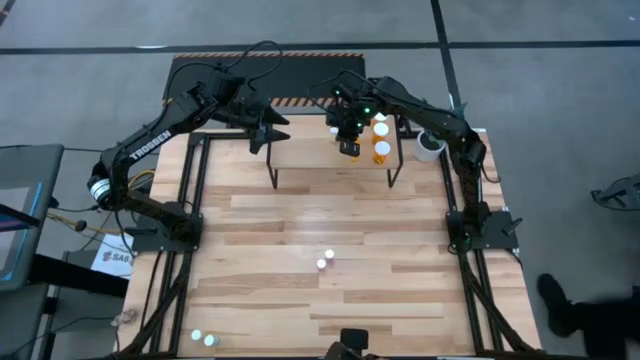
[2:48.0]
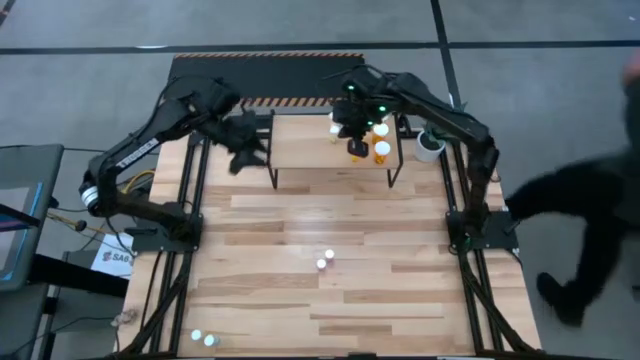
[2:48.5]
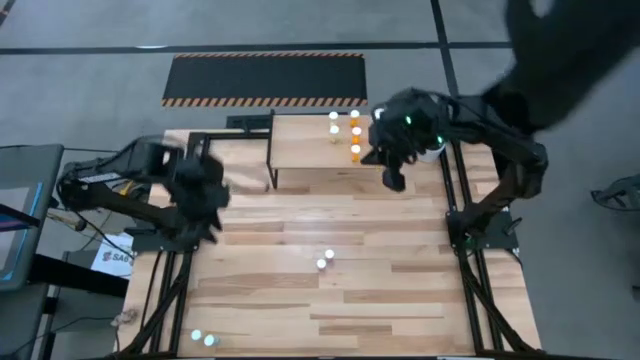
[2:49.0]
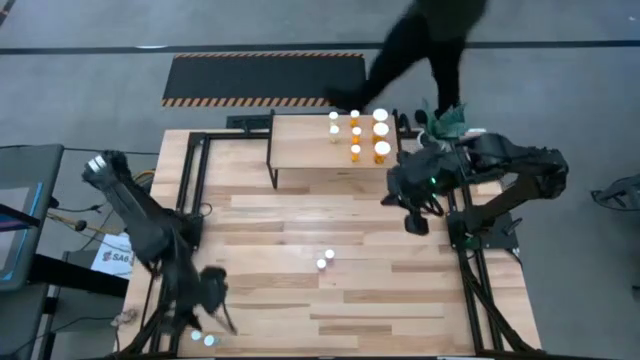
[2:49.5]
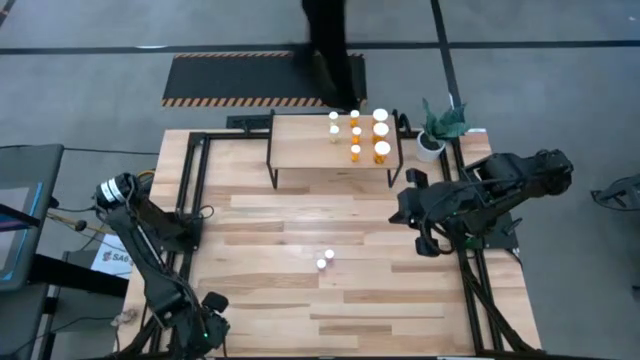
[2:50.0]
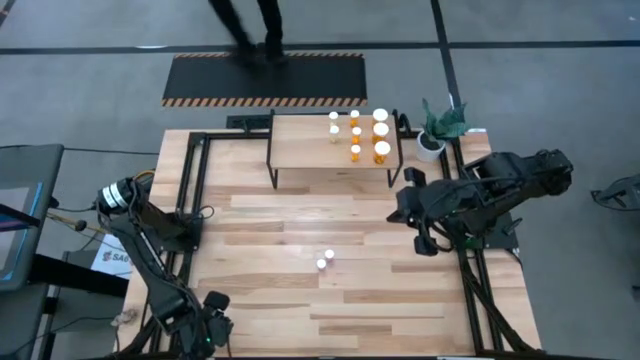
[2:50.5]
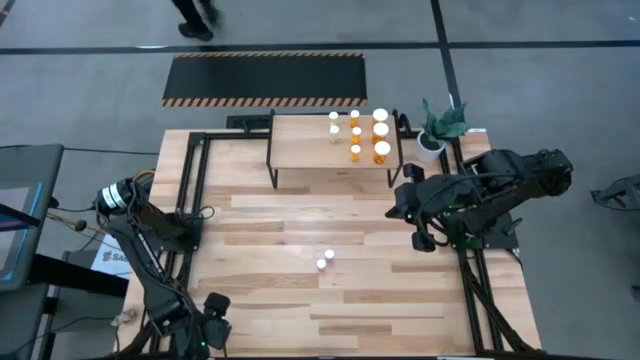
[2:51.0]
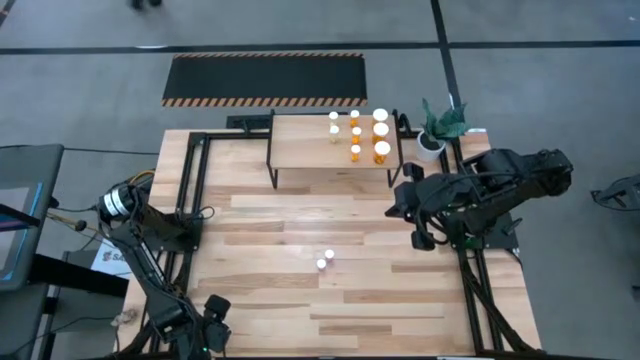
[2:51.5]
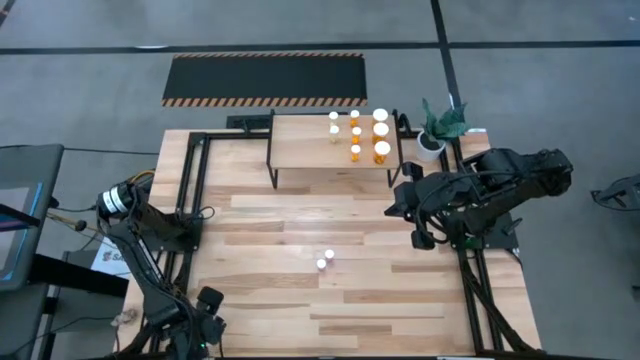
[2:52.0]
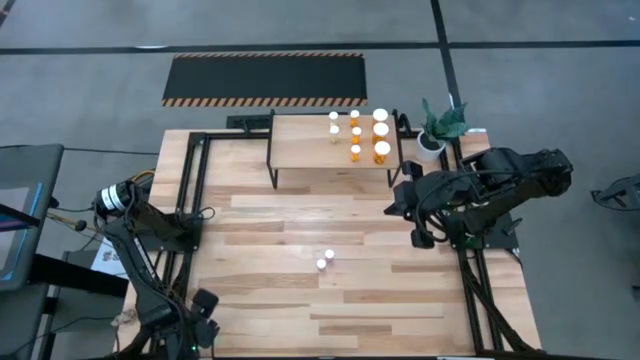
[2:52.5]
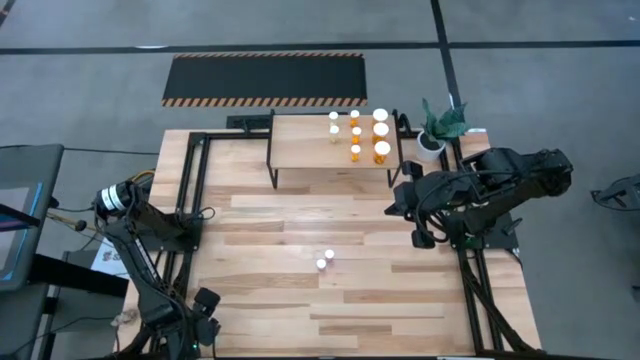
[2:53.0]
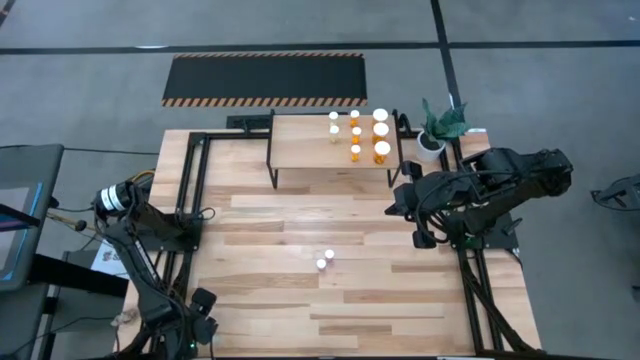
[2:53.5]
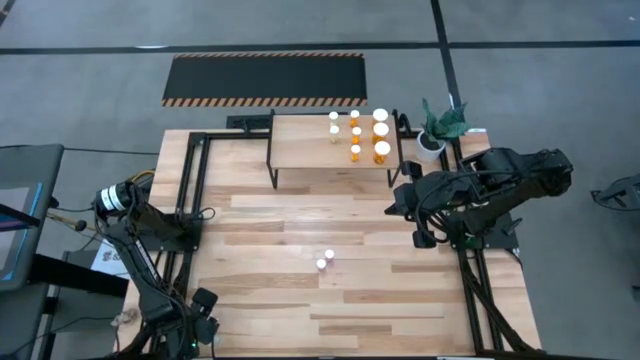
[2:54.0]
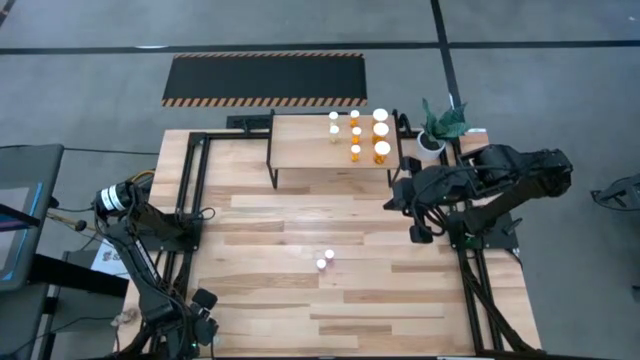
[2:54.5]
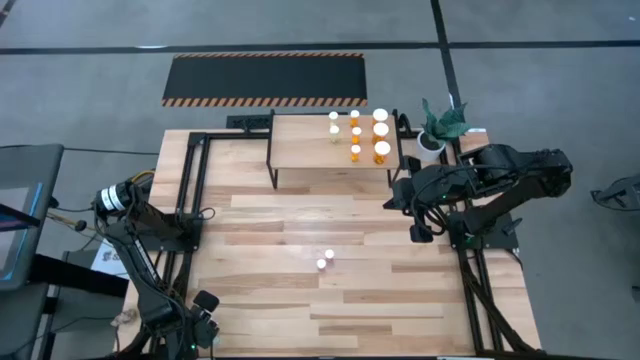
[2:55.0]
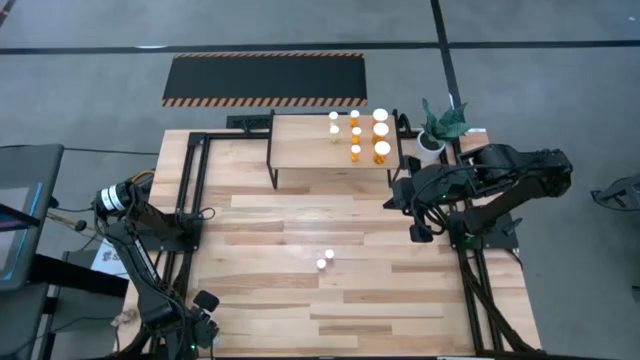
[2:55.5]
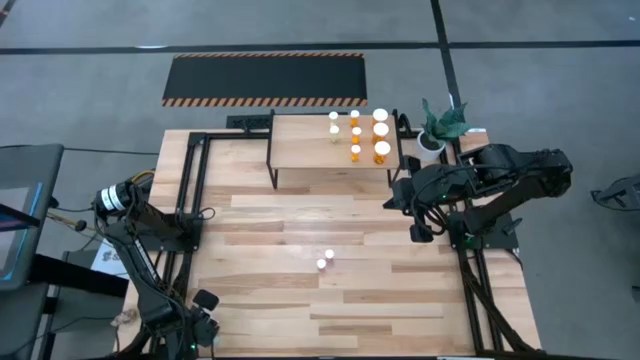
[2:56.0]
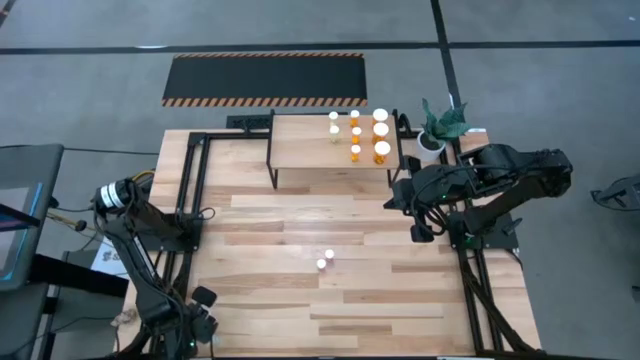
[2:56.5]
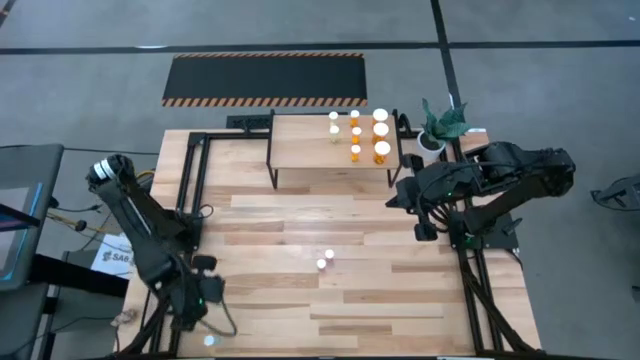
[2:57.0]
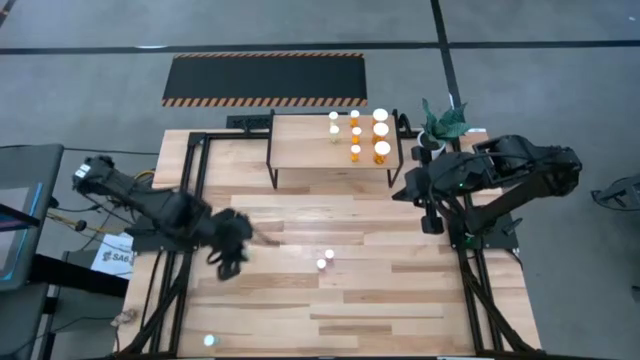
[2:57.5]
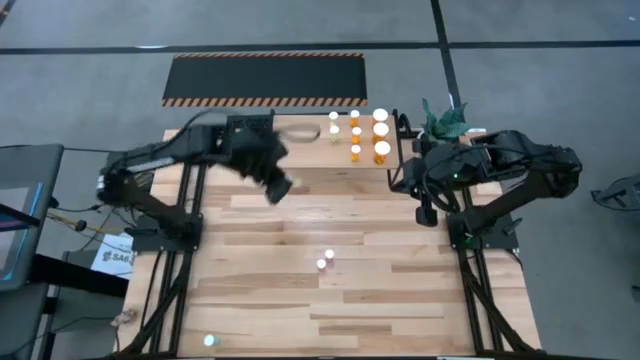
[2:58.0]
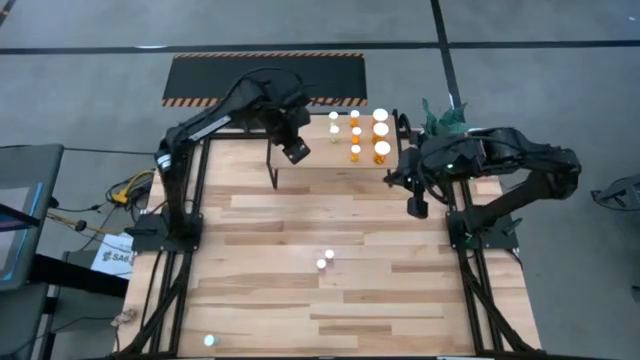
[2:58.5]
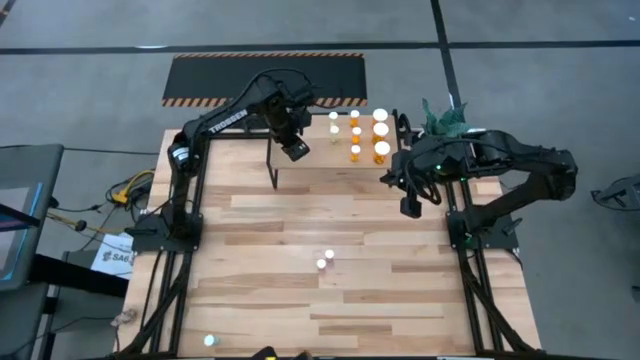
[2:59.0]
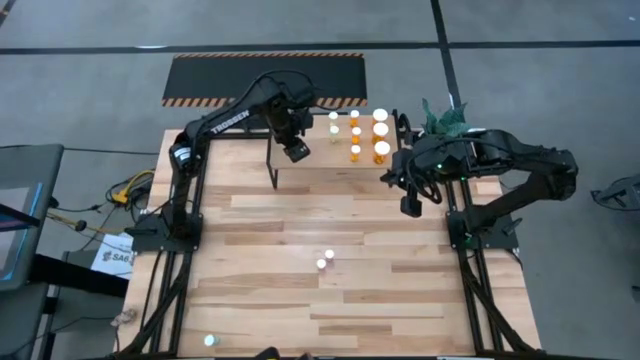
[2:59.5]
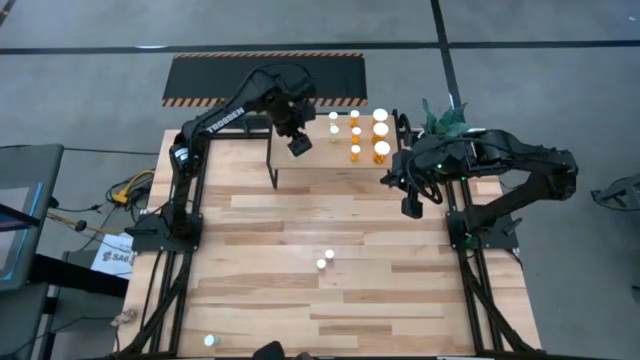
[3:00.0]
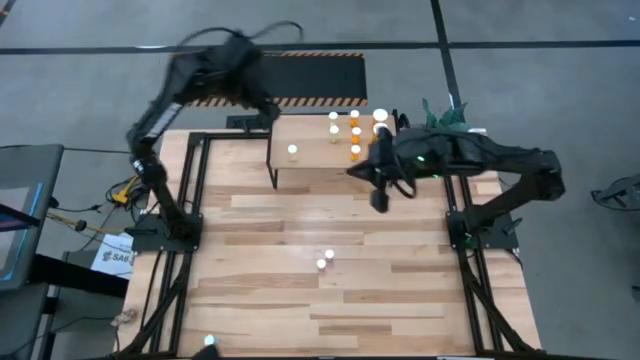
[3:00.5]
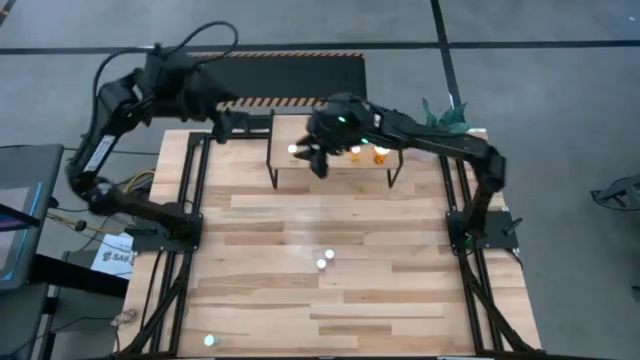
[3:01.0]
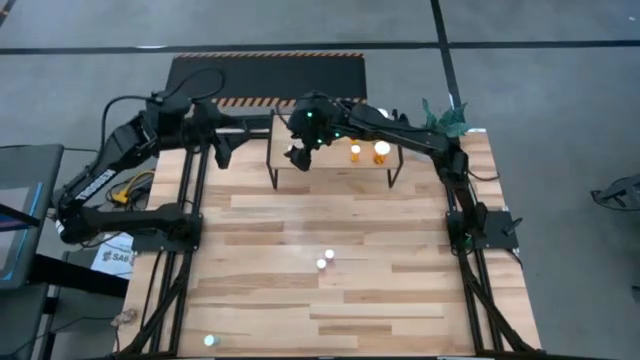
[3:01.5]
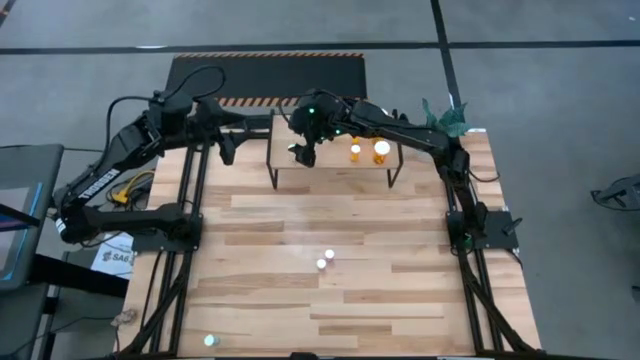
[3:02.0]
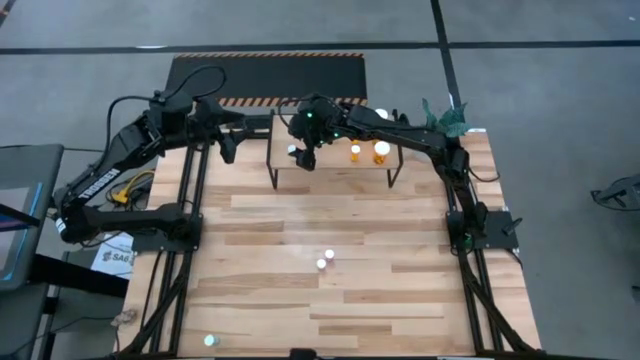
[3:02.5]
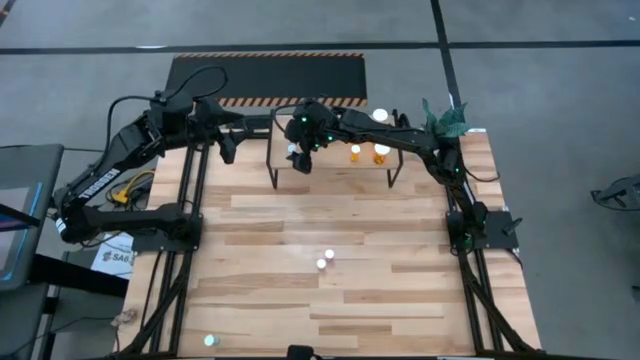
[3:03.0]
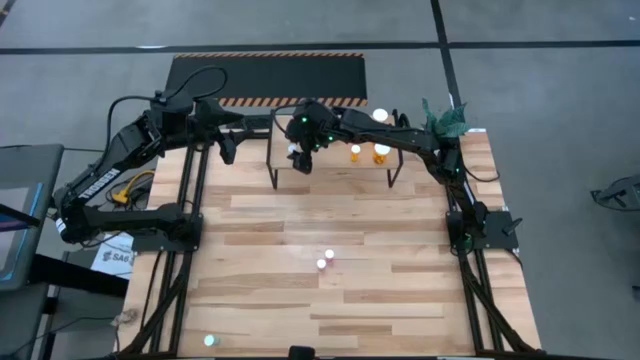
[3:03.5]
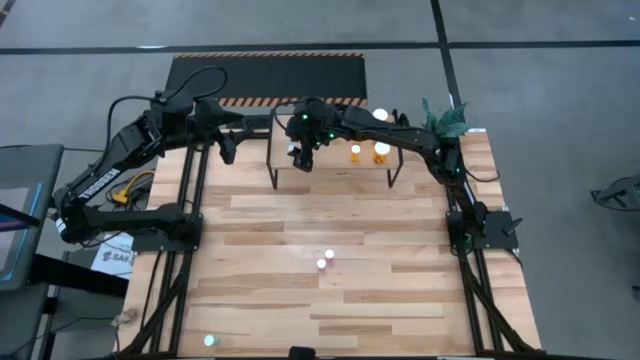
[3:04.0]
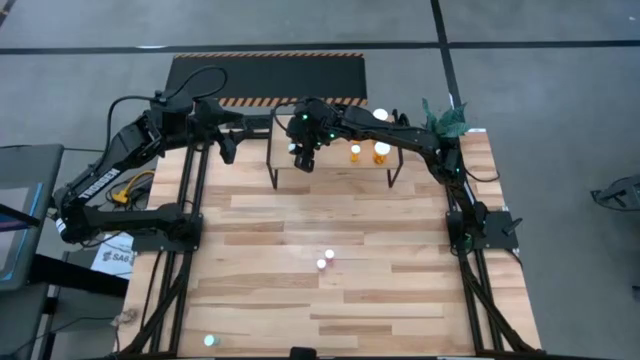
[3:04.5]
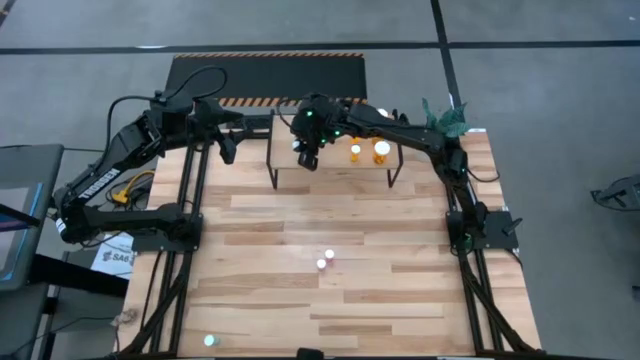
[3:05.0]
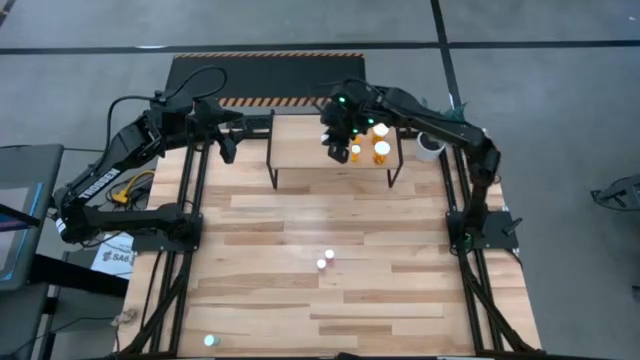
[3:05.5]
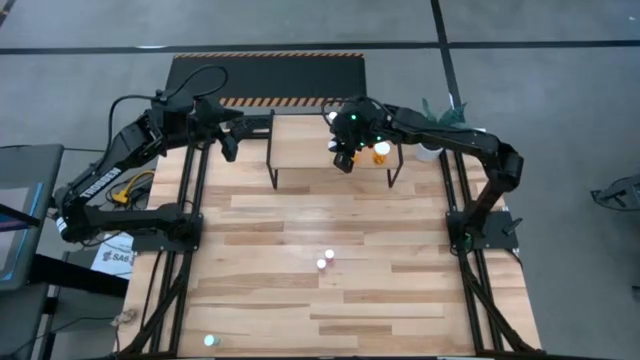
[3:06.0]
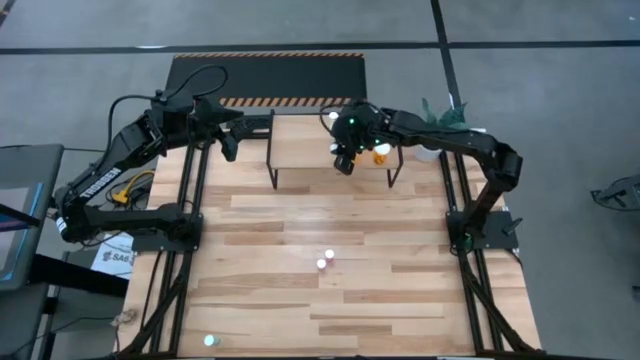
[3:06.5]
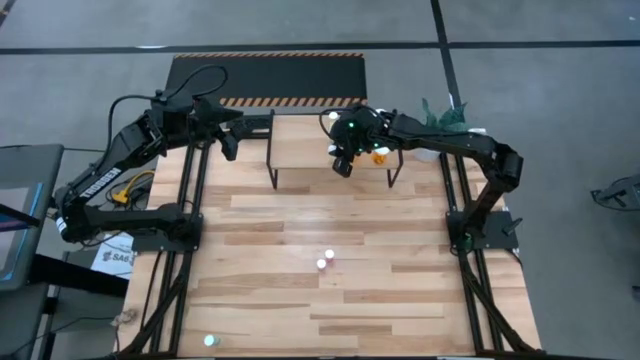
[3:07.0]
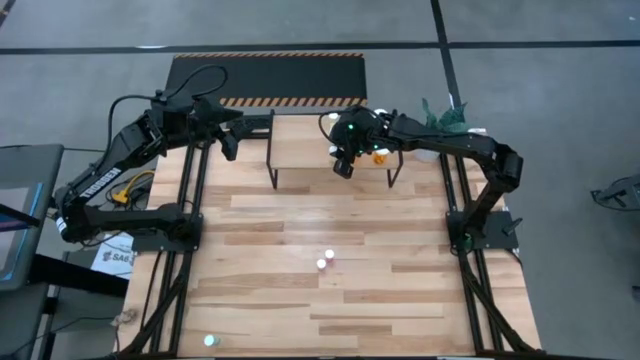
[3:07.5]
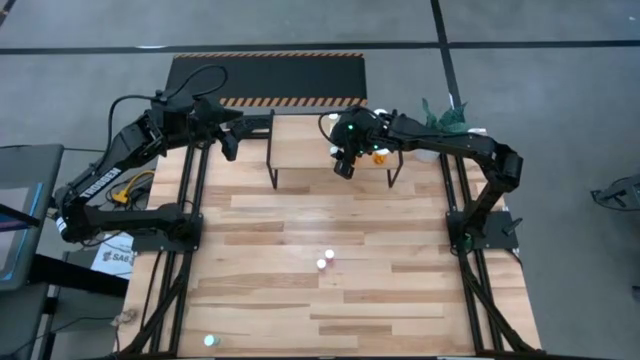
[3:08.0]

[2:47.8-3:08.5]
Task: Pick and place medicine bottles onto shelf by color
Put the small yellow pill bottle on the shelf aligned with the other small yellow pill bottles

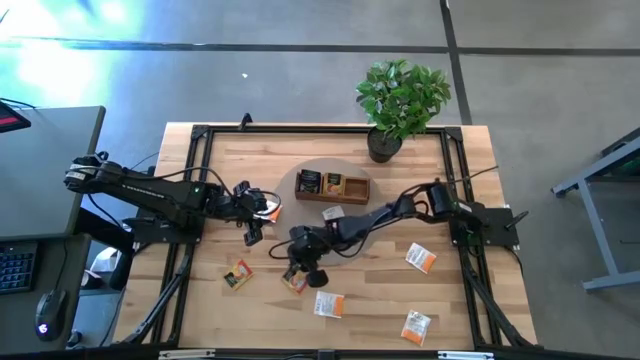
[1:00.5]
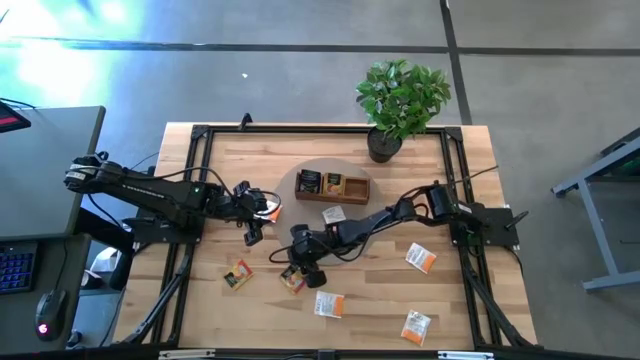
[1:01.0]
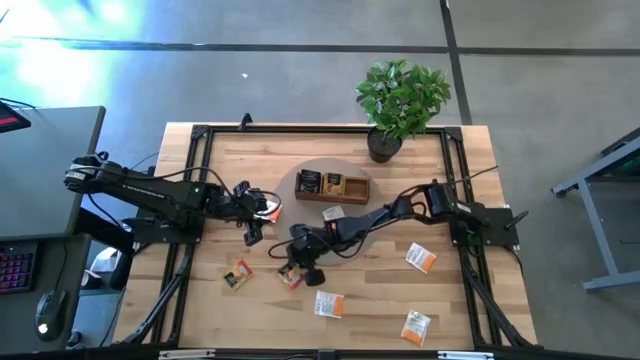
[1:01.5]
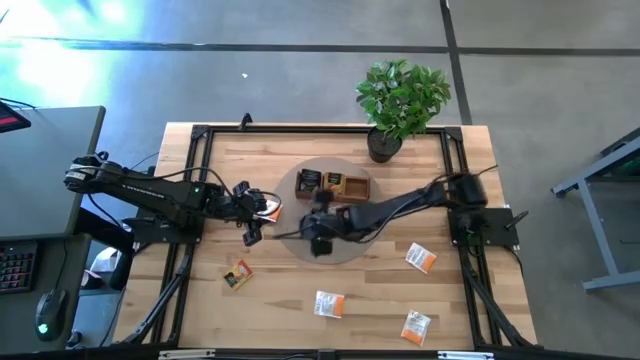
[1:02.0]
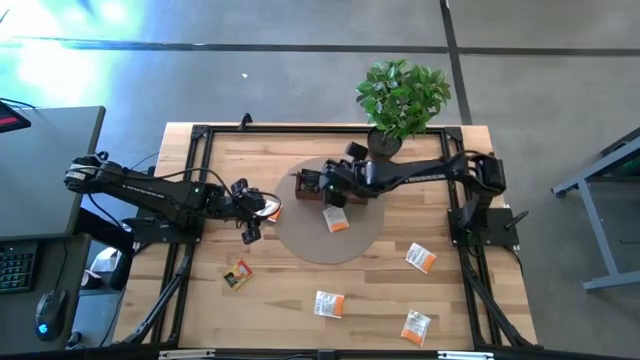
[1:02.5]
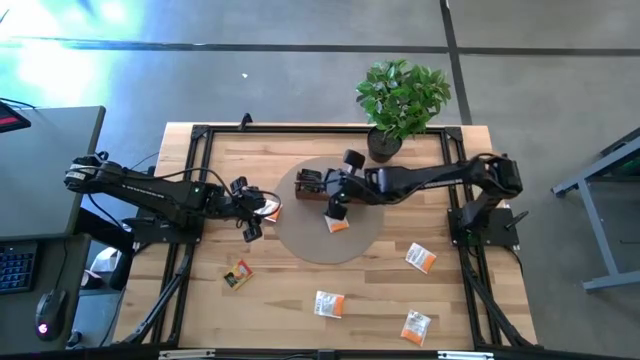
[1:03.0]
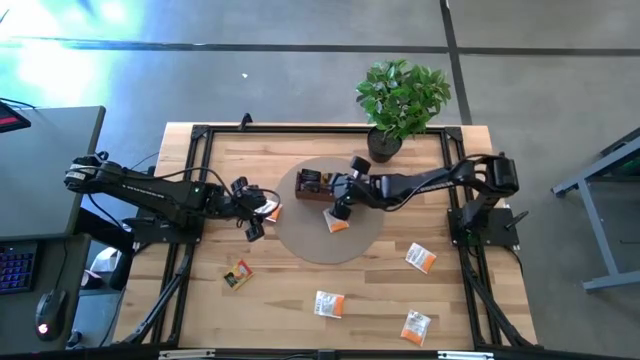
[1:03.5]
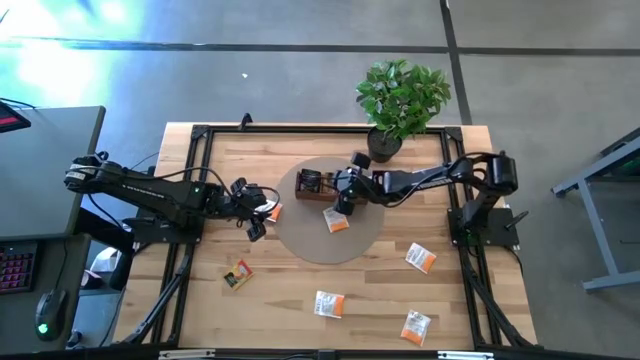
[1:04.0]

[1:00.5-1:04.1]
Task: Pick & Place Tea
Put the orange tea bag into the middle area of the wooden organizer
